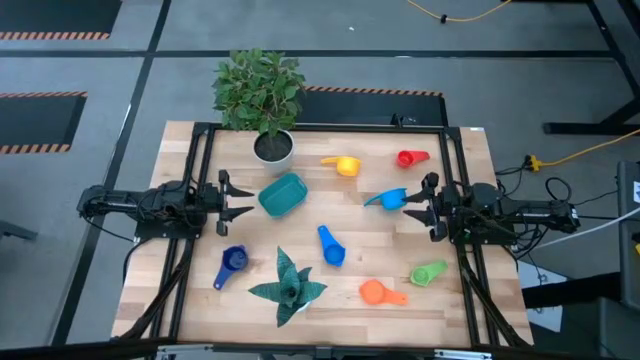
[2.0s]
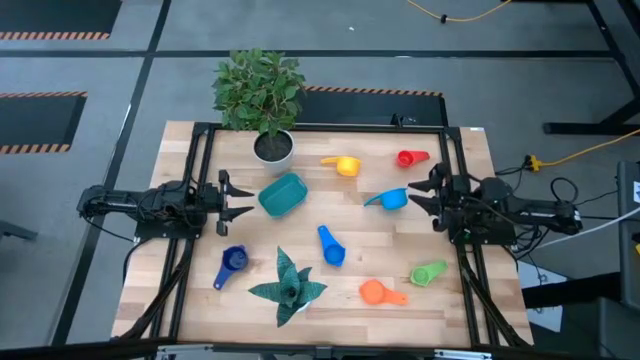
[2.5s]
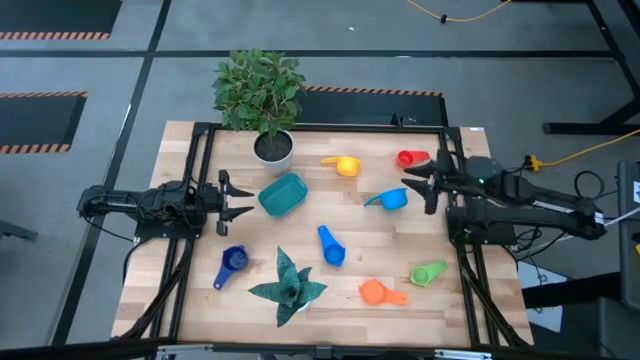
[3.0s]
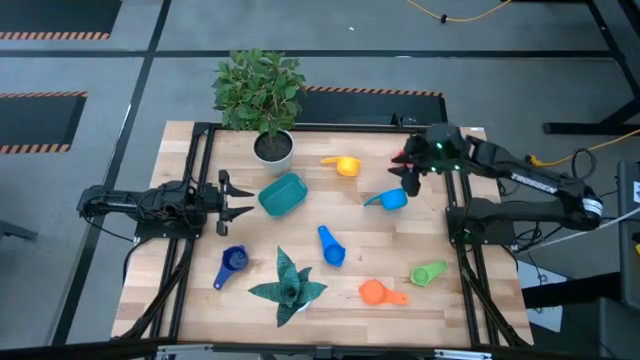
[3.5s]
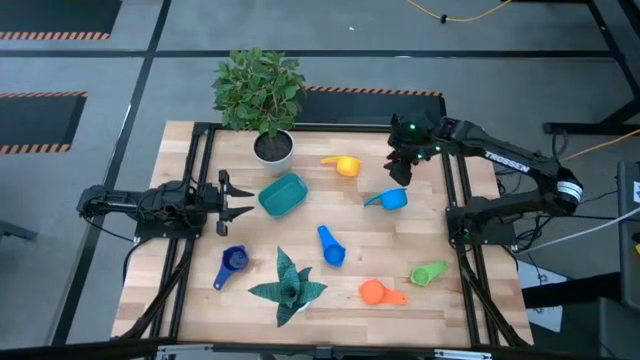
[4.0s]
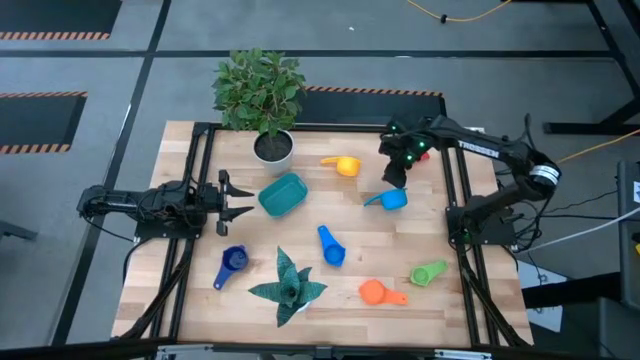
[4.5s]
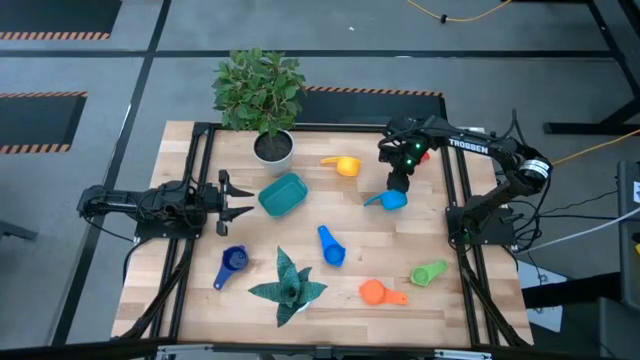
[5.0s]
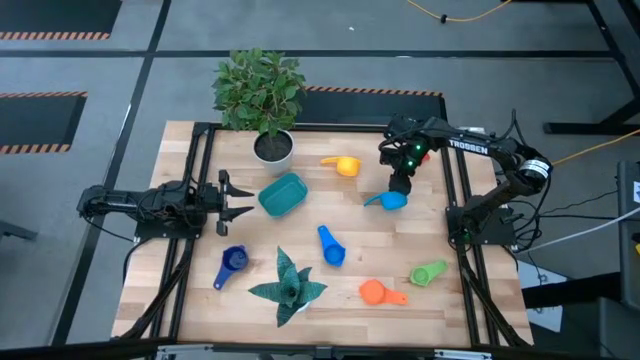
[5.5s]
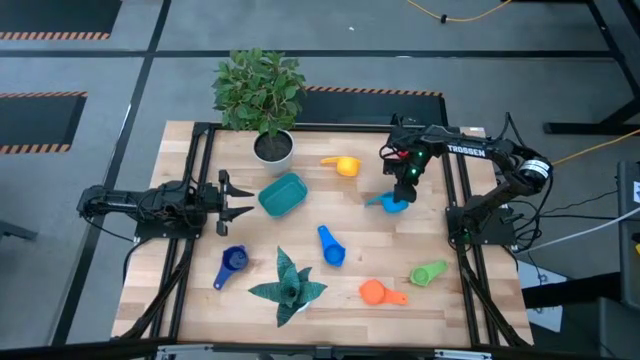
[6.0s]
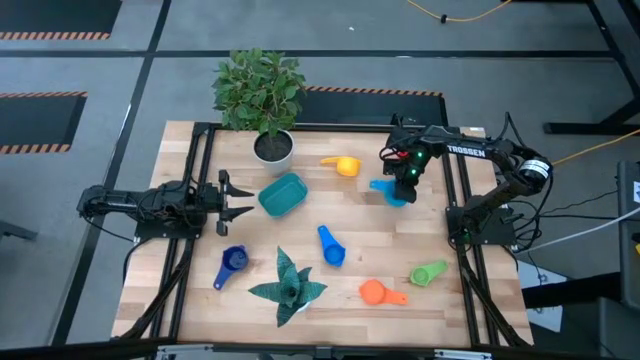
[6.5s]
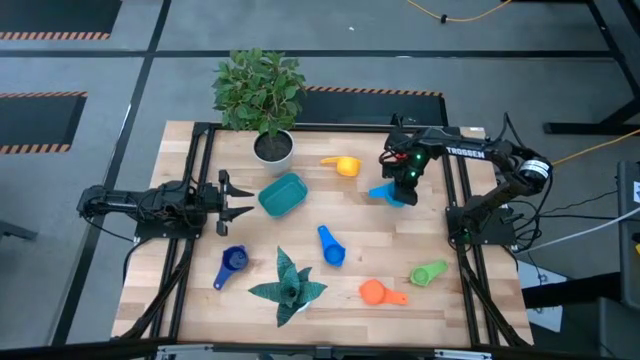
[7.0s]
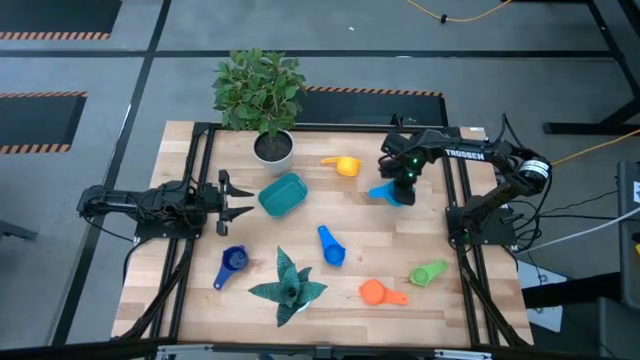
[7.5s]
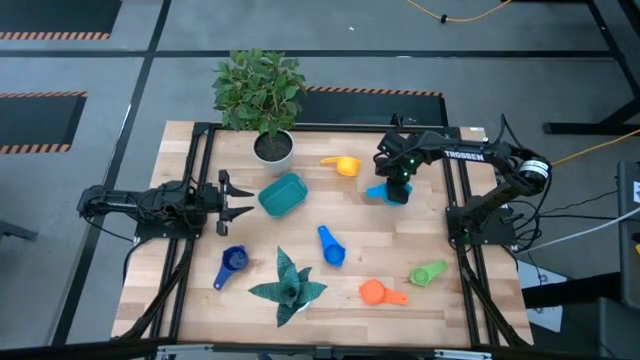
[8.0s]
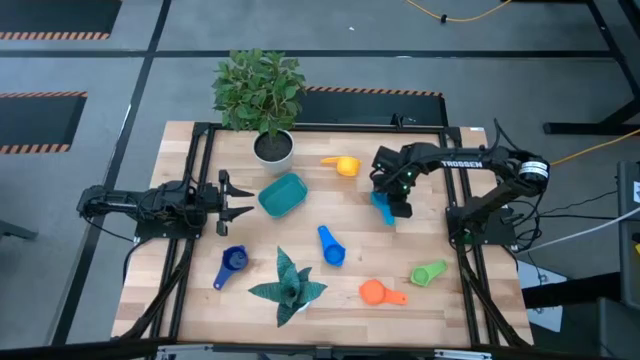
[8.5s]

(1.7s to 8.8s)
Task: Nest measuring cups in basket
Prepare the yellow measuring cup

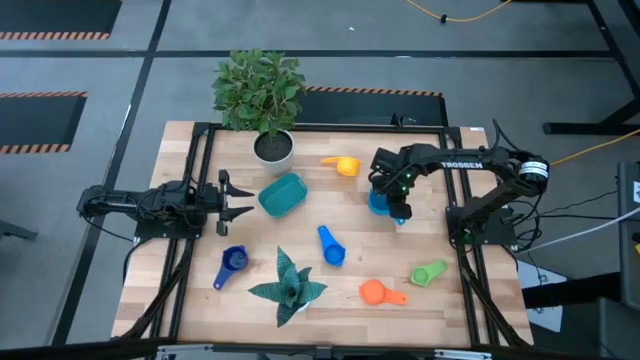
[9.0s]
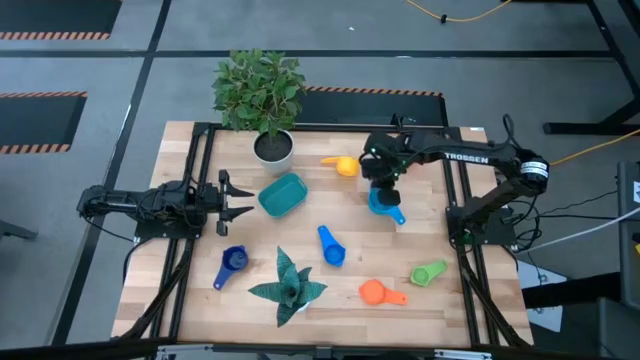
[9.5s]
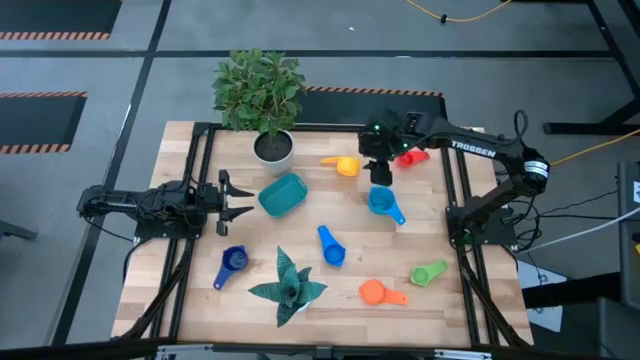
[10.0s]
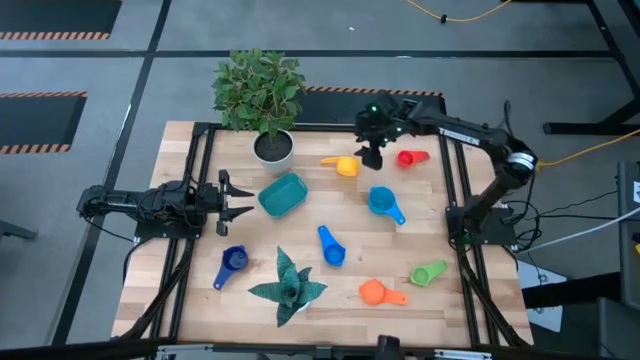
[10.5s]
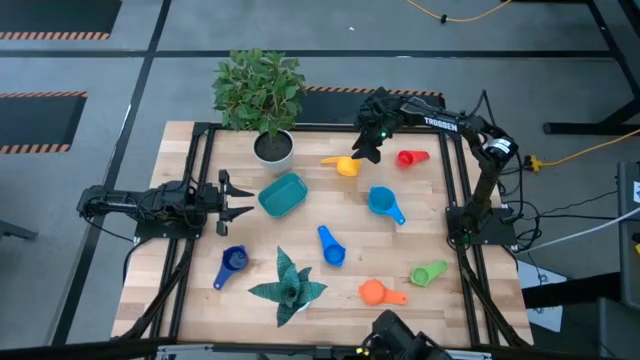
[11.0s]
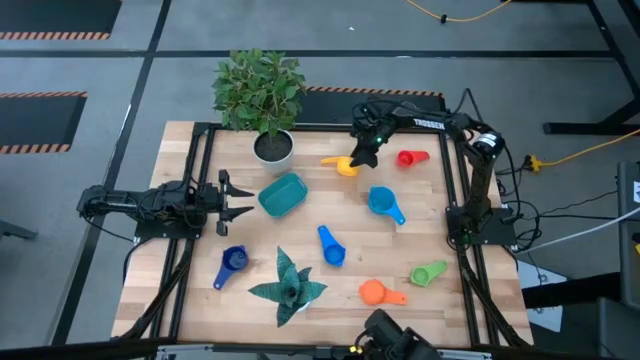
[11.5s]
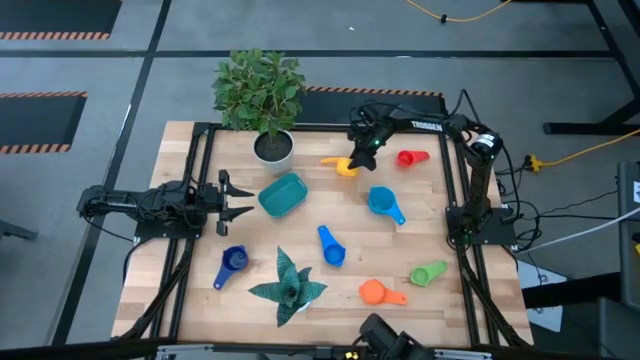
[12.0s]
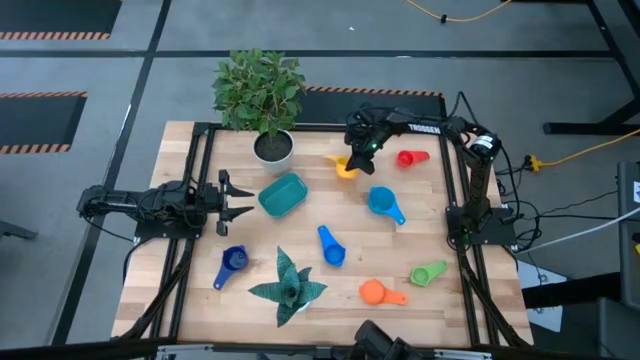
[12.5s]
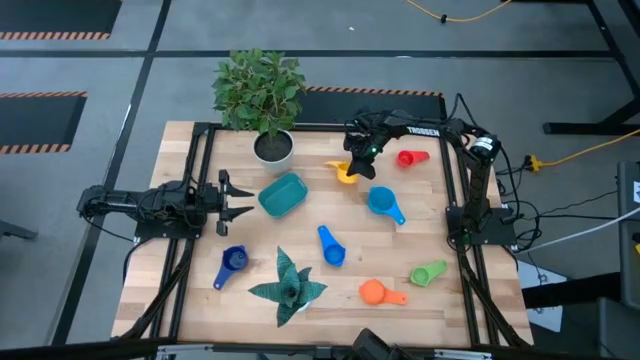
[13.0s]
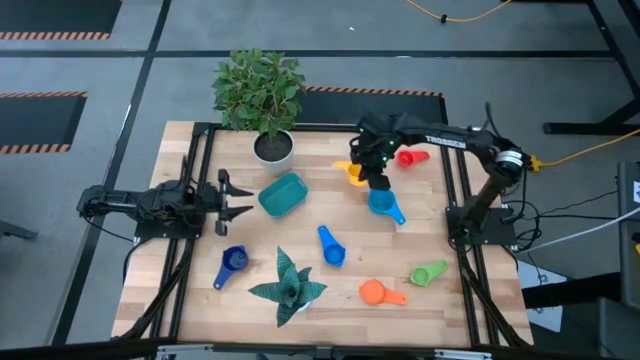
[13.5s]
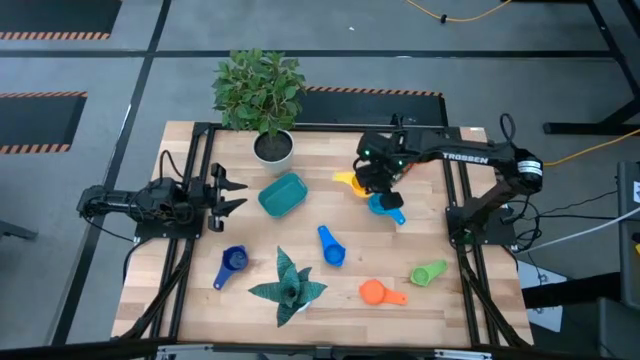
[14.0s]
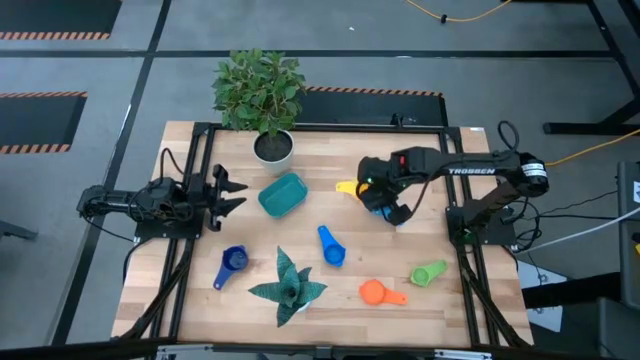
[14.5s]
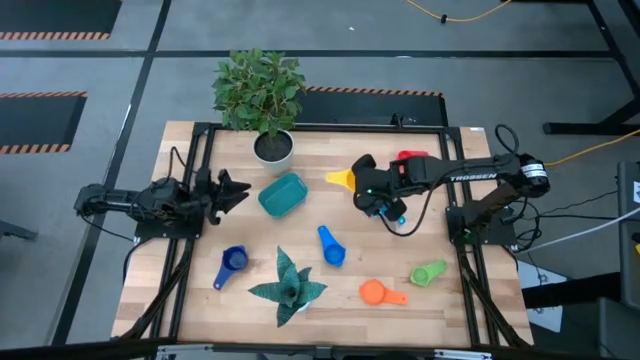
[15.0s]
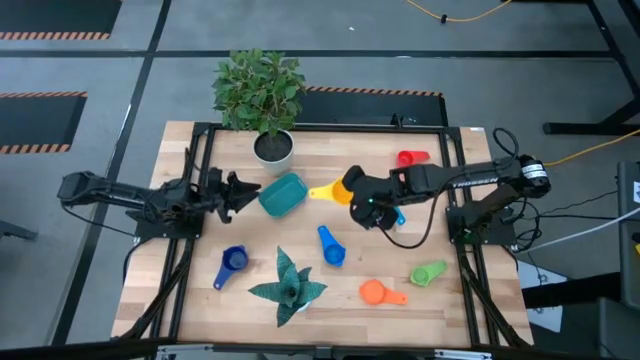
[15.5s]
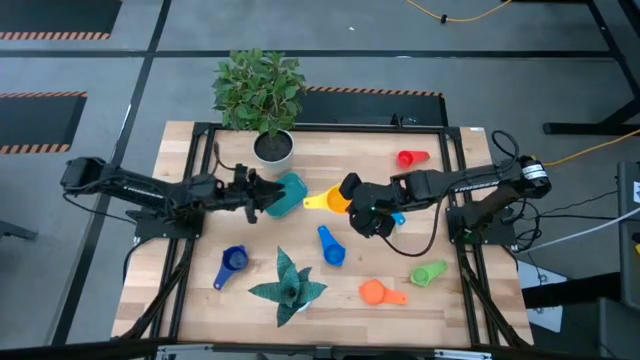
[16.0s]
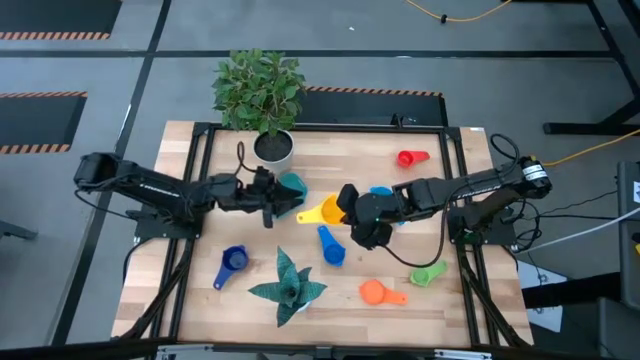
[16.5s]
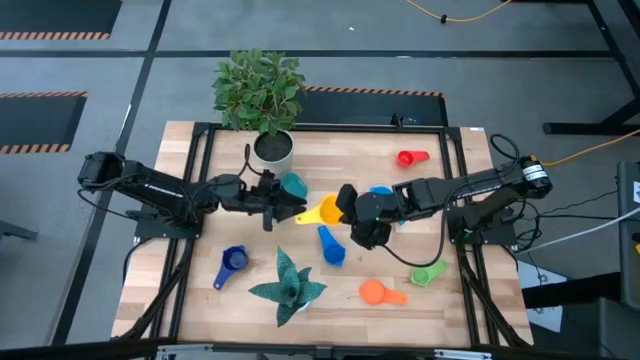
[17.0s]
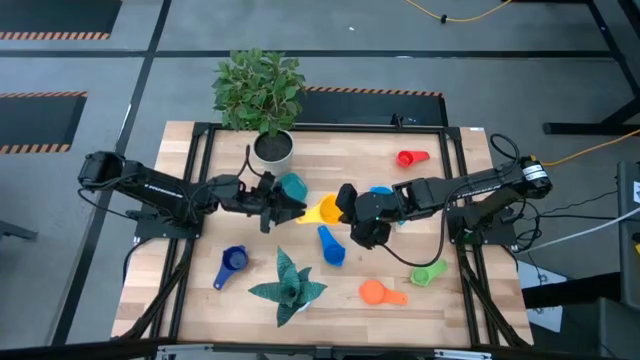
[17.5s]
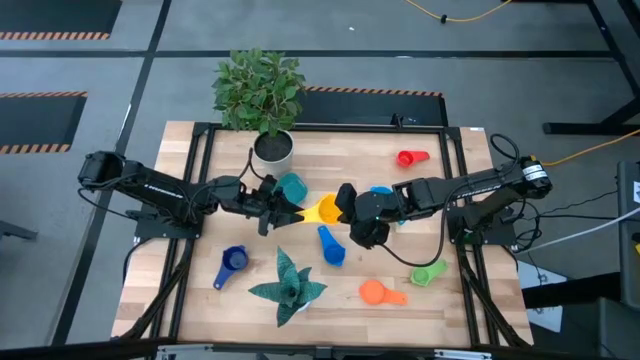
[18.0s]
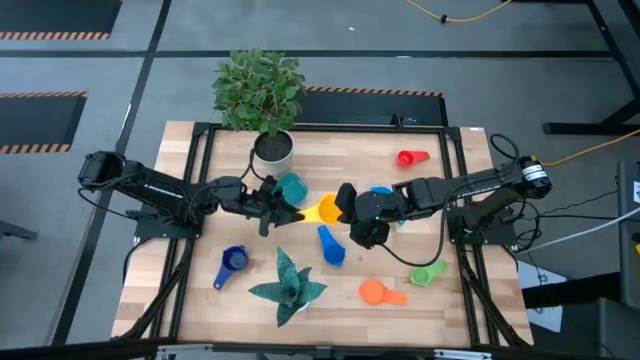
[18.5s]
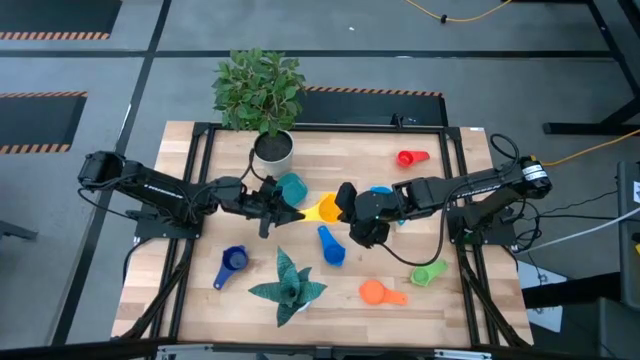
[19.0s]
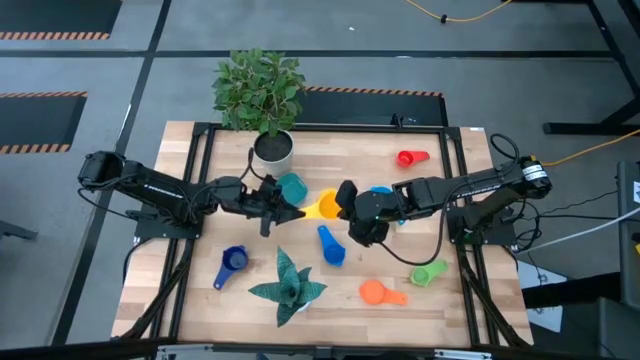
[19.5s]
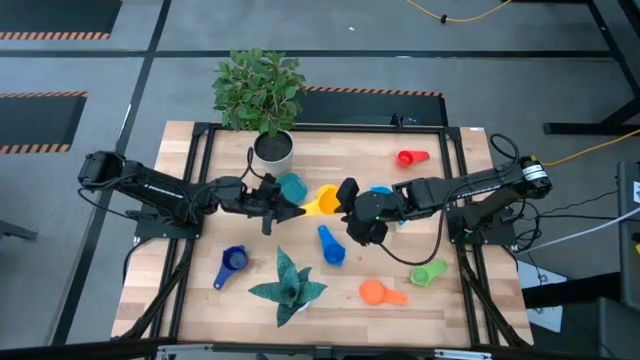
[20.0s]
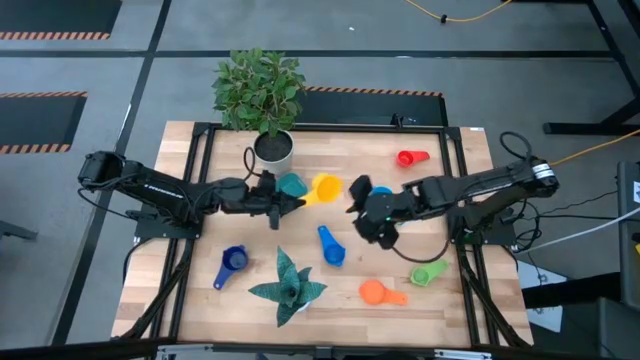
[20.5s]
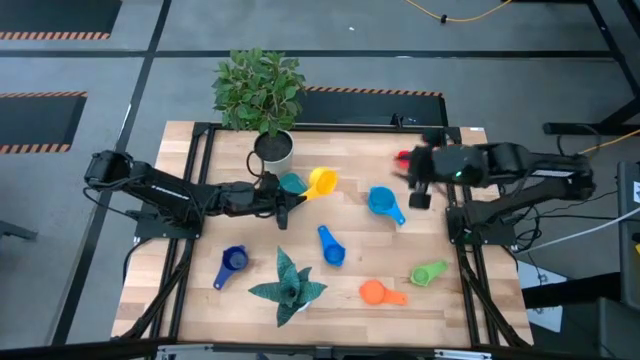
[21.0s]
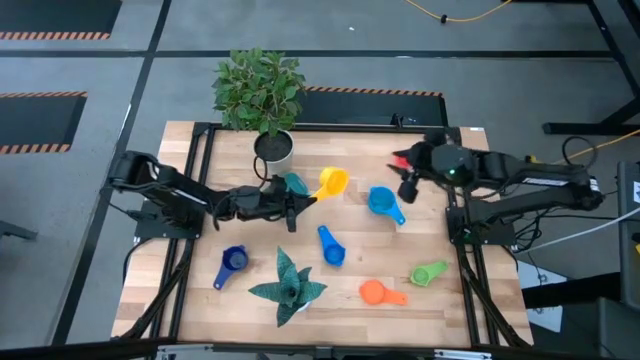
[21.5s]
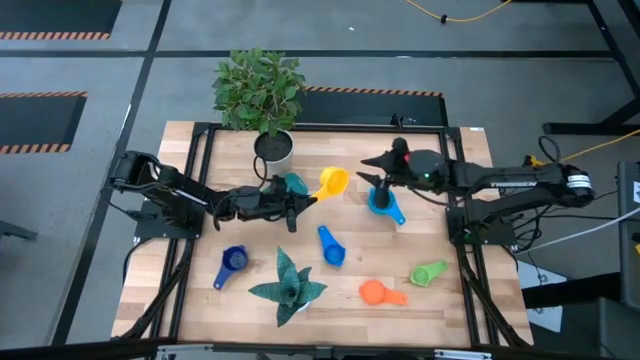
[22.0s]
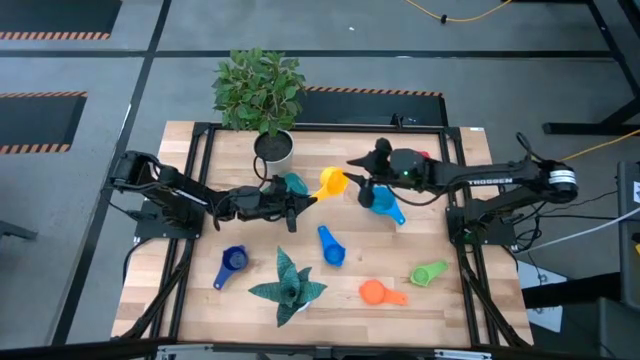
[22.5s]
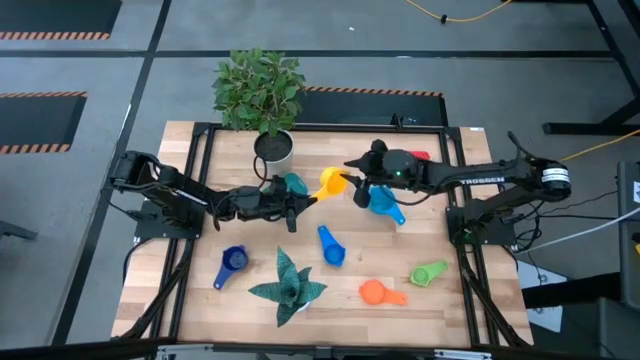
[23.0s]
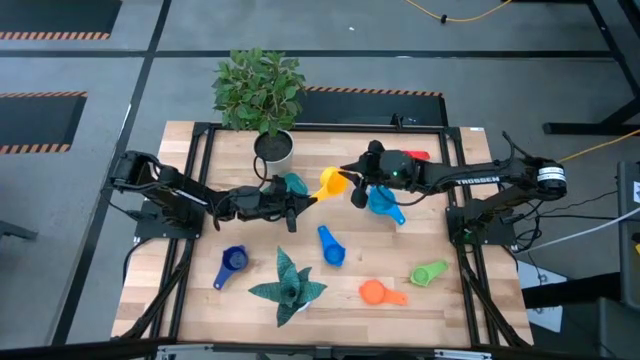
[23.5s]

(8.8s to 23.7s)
Stack the yellow measuring cup on top of the light blue measuring cup
